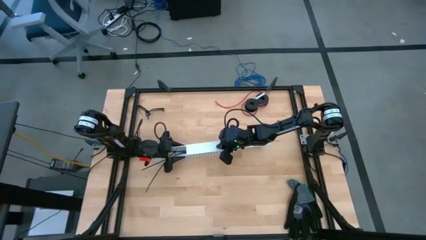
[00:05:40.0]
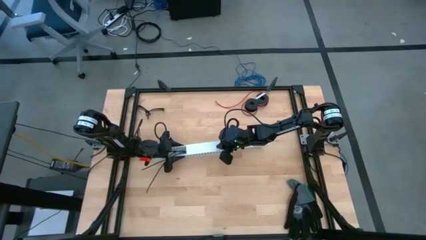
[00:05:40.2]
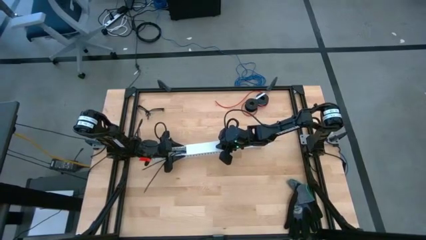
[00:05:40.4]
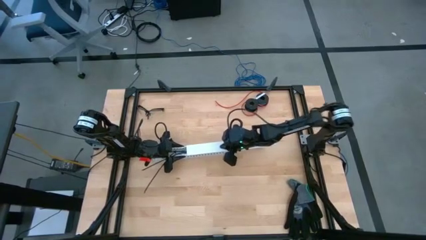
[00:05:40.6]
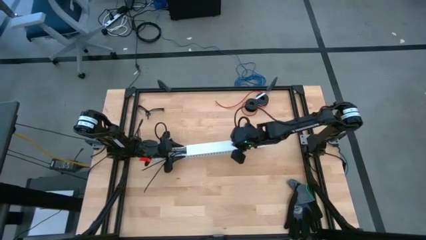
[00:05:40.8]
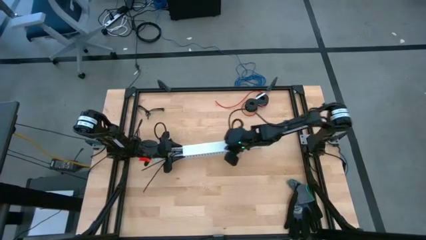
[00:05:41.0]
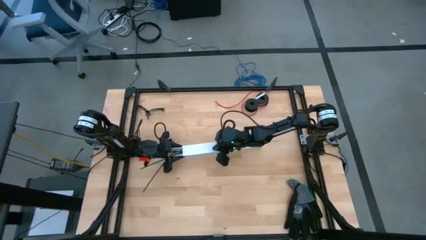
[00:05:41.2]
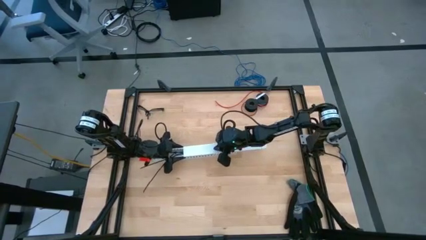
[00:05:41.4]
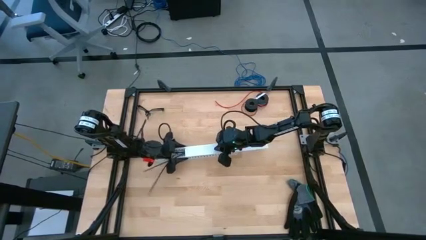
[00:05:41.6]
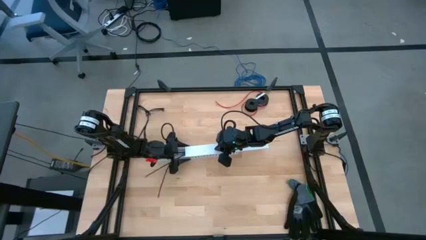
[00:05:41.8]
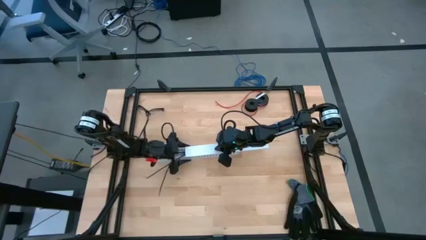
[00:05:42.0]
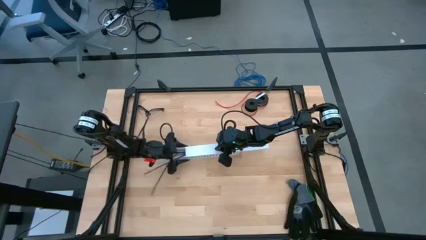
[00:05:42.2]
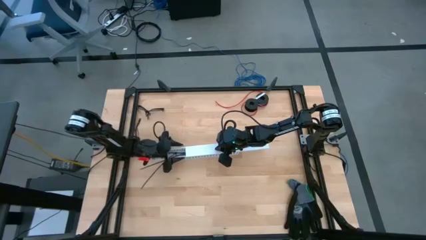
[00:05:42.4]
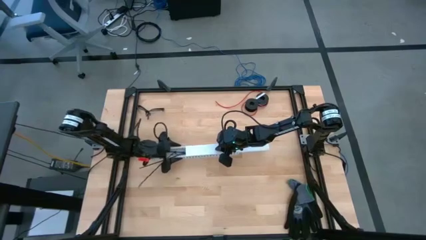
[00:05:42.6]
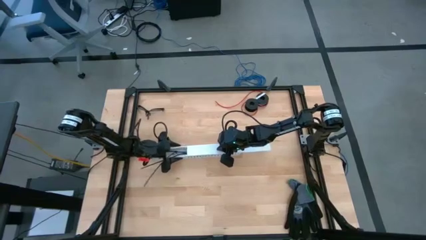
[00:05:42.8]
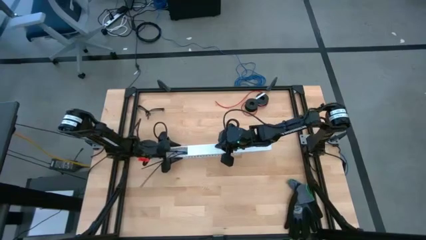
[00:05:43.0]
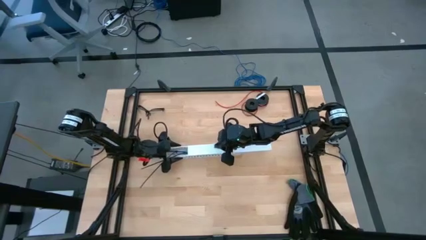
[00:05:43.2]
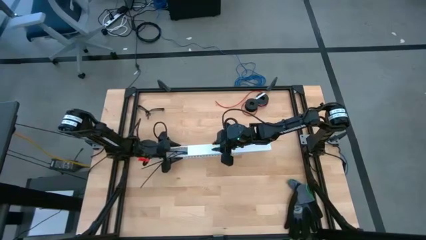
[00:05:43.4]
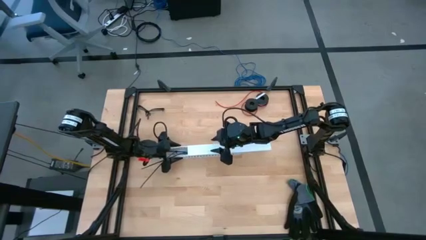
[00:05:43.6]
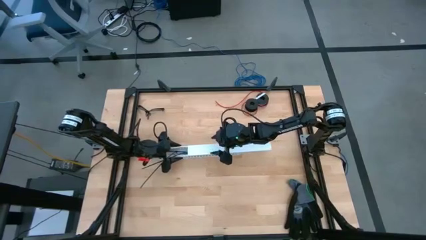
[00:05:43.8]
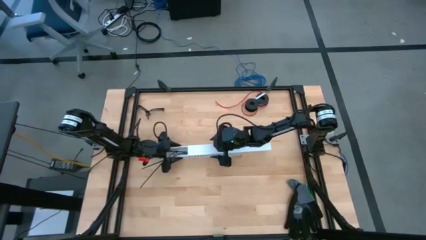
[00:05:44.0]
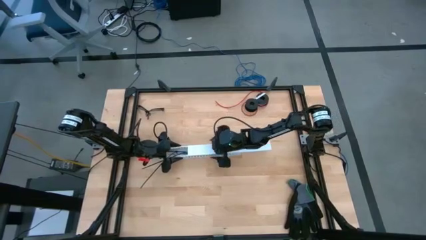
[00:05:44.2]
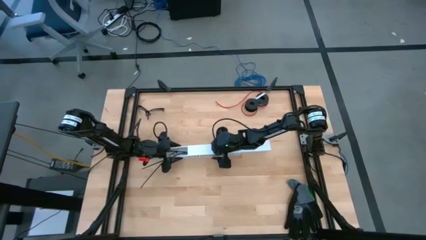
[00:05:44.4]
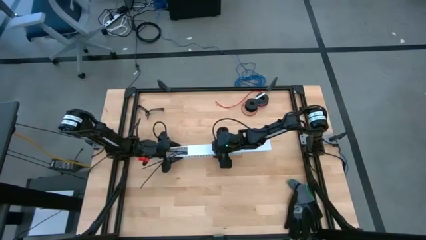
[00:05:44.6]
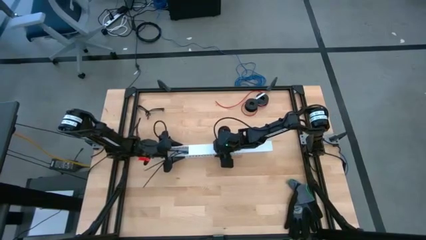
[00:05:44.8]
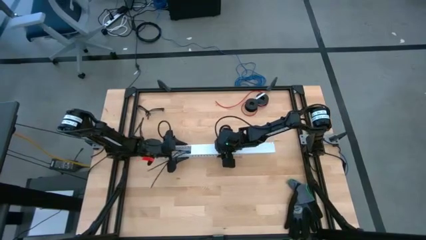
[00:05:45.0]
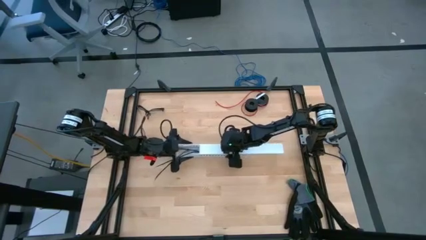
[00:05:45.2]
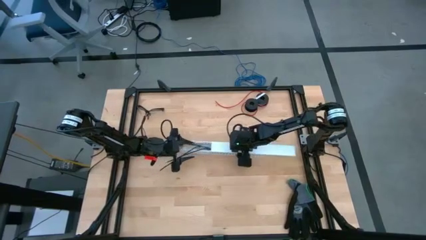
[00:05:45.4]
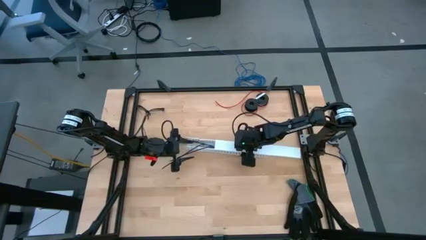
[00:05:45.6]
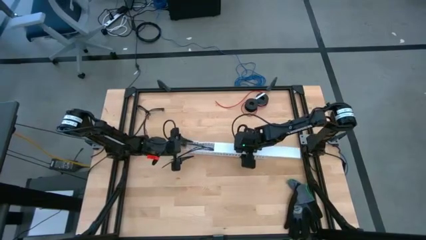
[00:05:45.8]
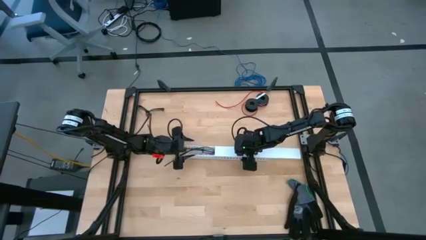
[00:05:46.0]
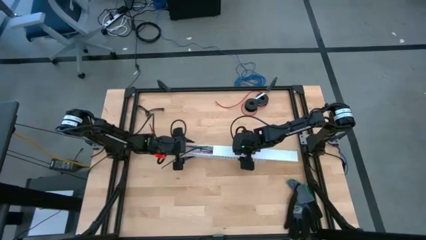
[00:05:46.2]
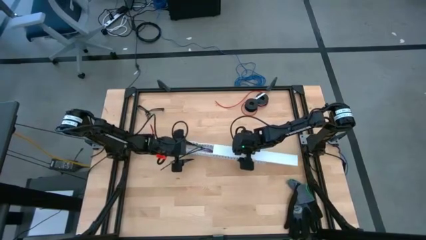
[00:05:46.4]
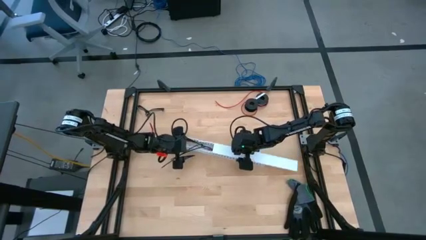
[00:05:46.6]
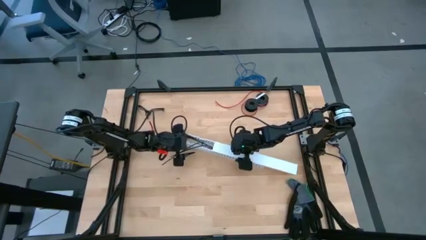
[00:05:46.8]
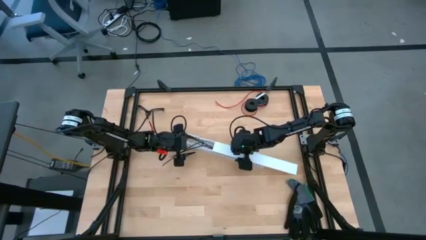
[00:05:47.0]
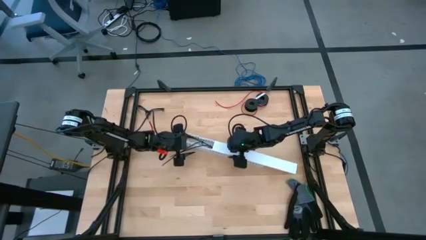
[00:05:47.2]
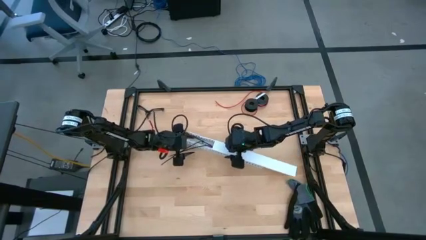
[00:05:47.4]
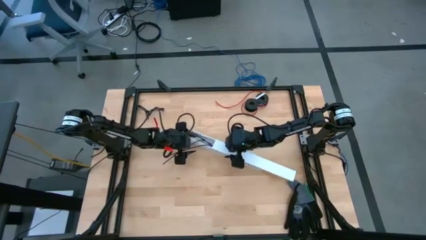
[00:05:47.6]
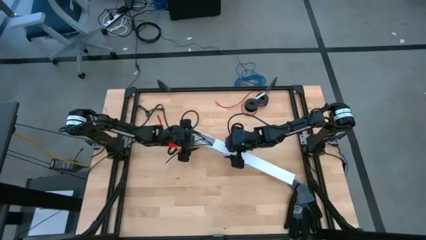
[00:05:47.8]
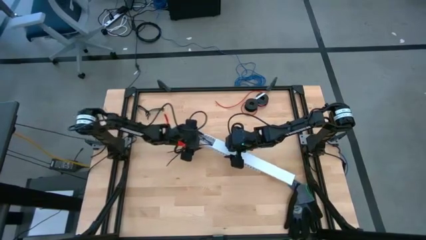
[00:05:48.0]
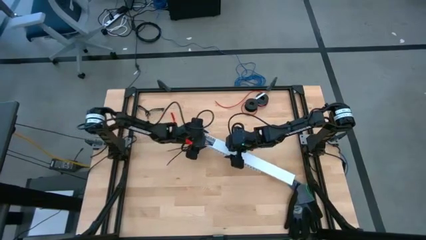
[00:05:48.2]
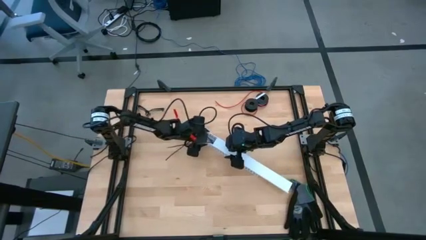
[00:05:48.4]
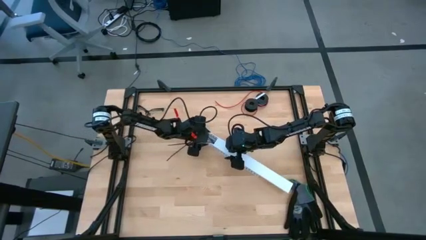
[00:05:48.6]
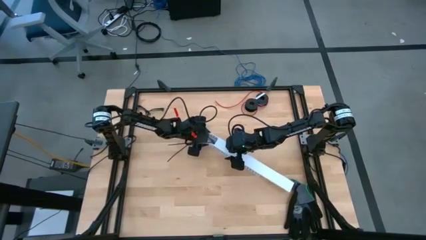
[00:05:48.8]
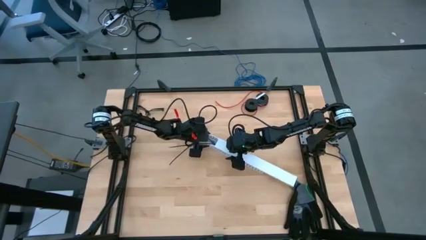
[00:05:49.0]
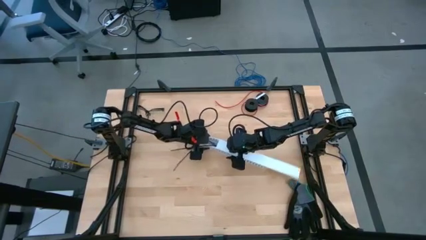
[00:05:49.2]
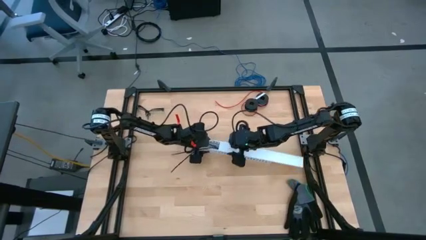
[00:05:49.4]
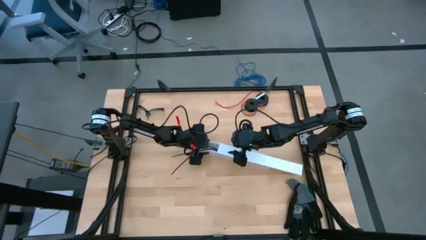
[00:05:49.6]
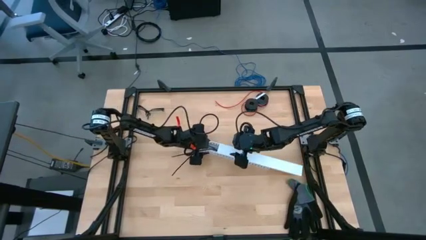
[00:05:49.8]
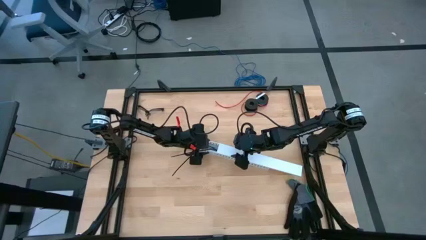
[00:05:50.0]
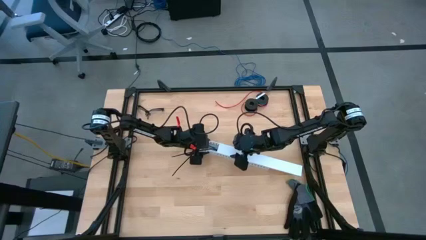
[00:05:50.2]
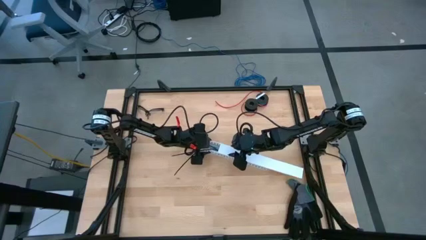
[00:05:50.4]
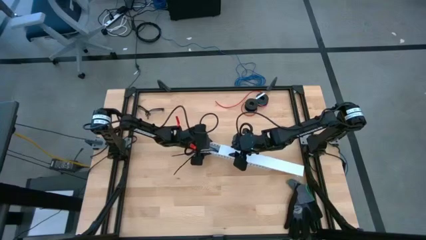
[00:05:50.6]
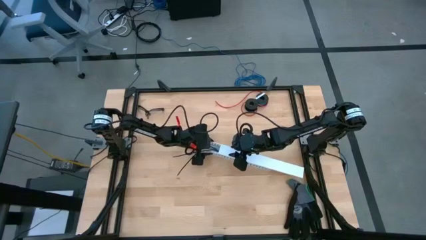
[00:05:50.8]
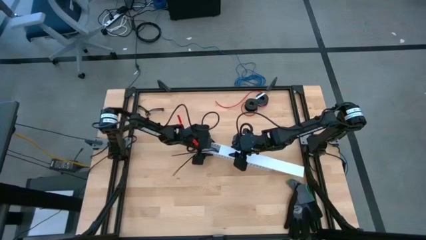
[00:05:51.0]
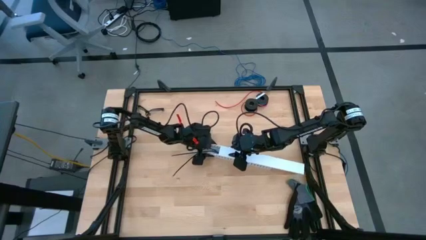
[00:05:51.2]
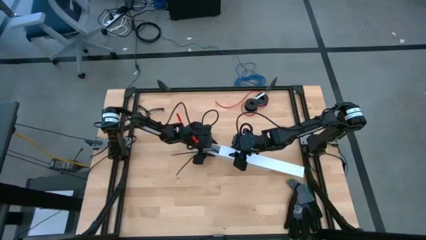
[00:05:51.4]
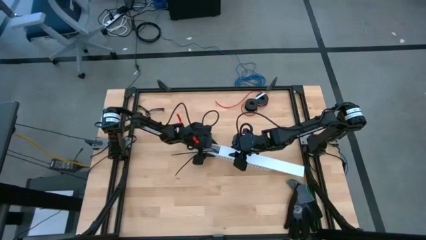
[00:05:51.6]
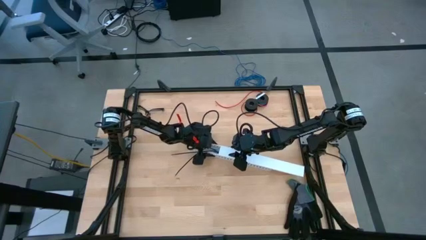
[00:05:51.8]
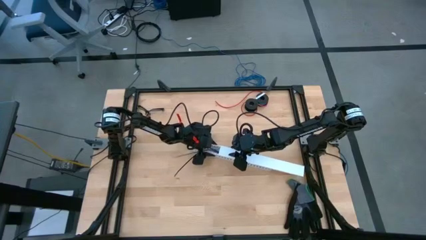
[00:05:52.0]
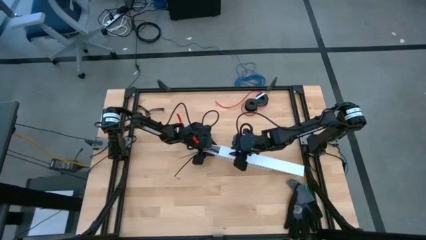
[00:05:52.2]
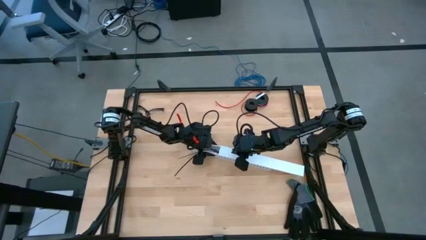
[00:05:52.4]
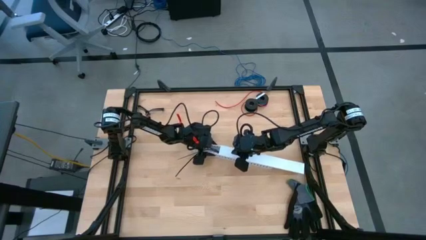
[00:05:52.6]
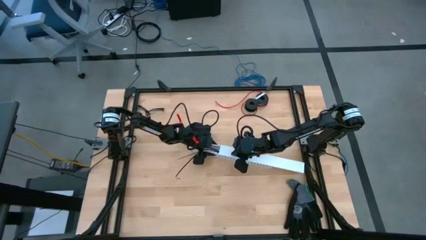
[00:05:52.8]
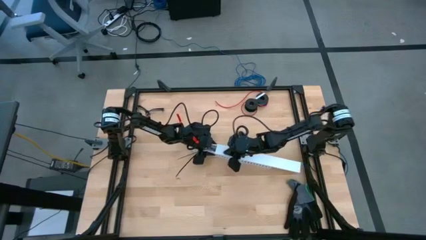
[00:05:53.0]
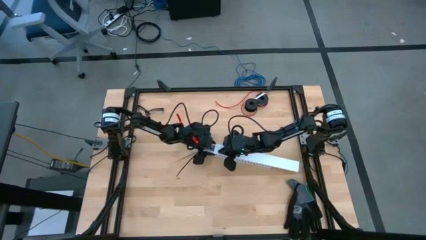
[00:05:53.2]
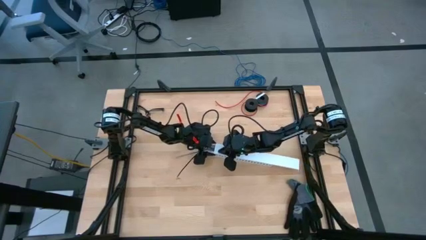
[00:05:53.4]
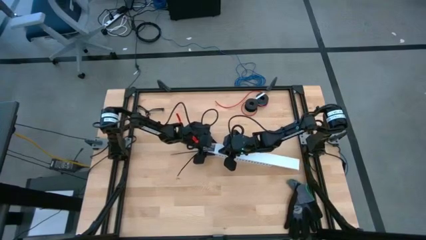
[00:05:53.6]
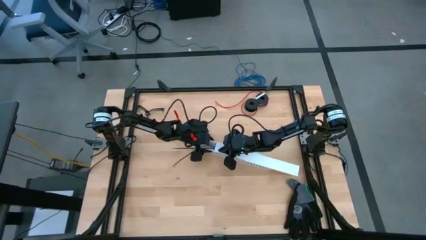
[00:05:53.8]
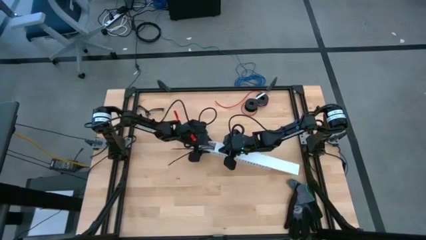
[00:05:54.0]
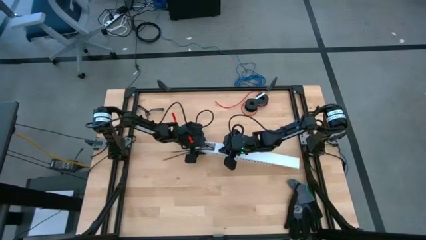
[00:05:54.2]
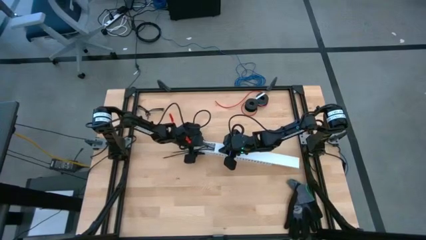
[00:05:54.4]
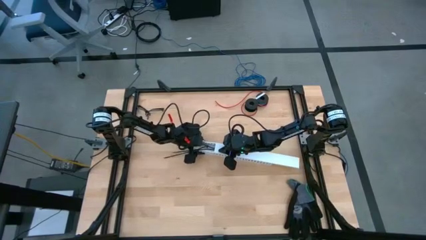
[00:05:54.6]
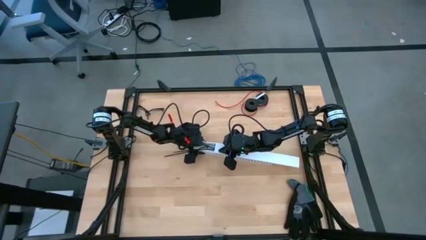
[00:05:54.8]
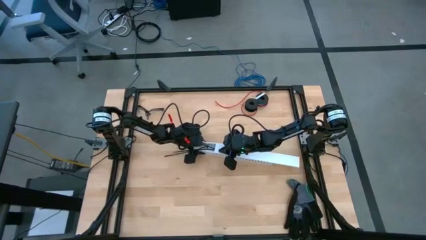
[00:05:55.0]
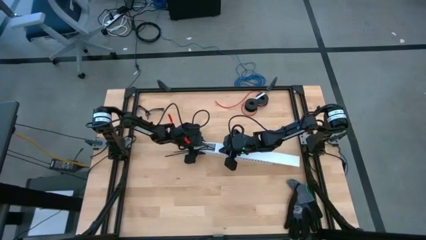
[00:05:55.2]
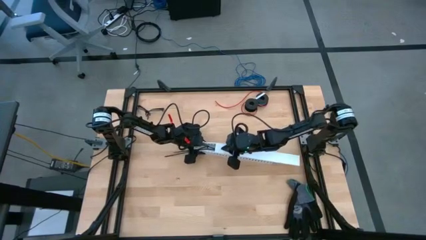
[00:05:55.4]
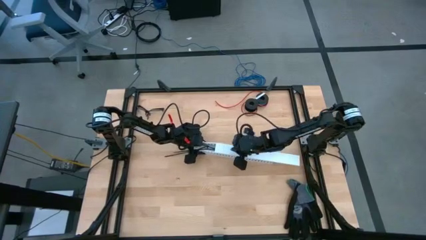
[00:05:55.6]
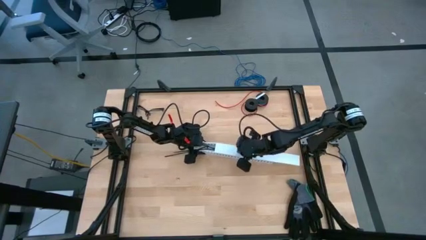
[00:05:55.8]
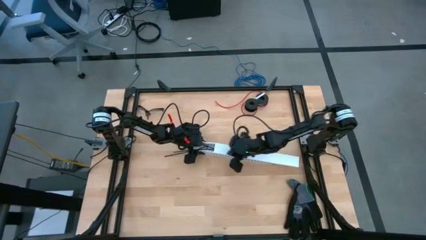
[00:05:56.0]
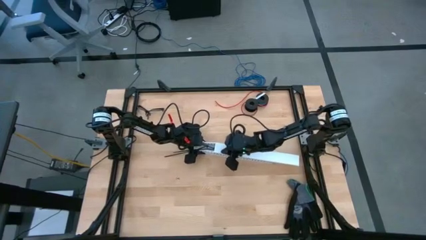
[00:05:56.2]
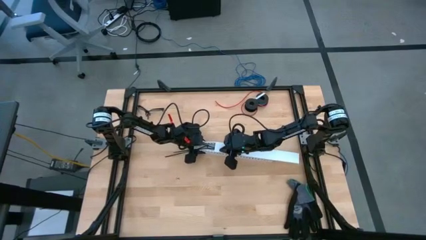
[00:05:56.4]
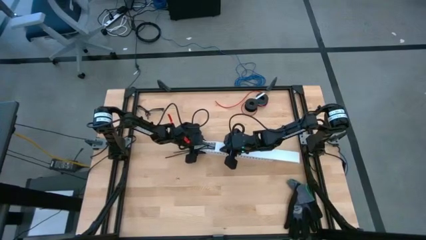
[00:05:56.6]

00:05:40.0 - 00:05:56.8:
Task: Ziptie cables
Close the white cable duct
